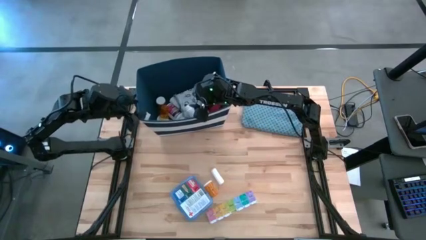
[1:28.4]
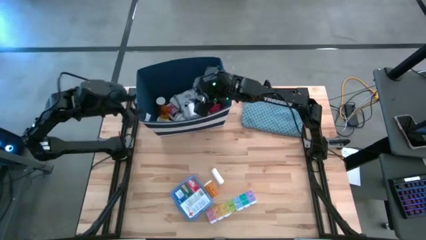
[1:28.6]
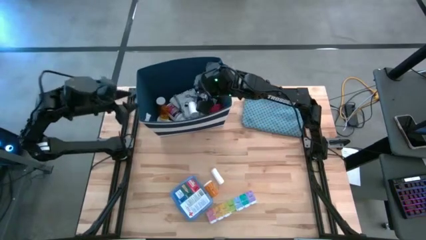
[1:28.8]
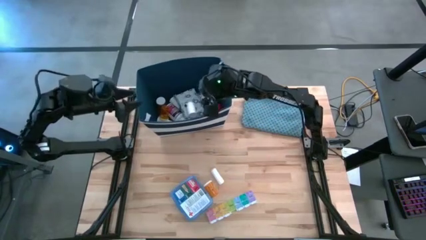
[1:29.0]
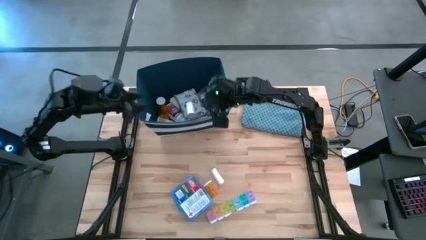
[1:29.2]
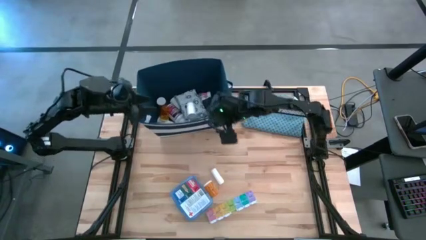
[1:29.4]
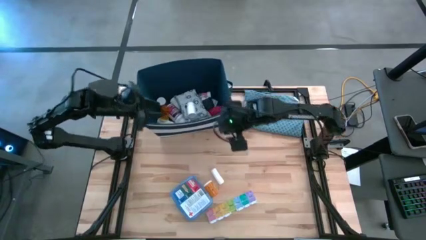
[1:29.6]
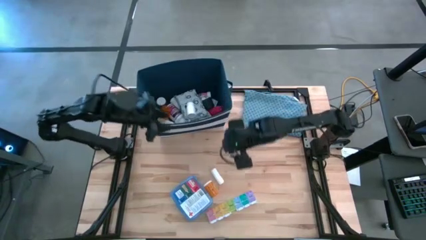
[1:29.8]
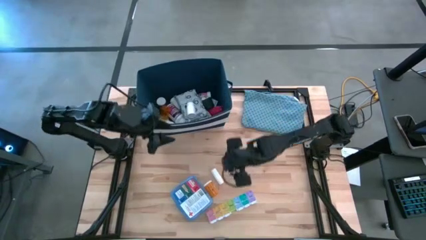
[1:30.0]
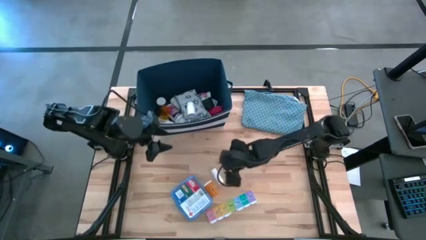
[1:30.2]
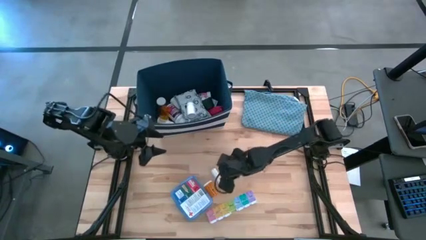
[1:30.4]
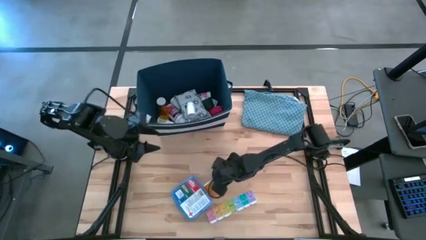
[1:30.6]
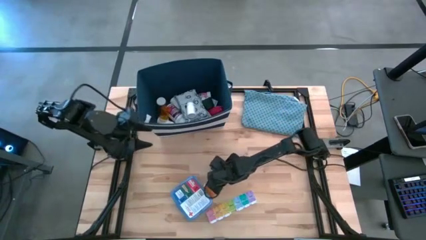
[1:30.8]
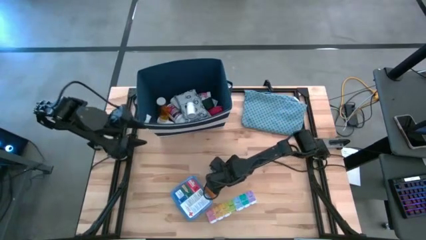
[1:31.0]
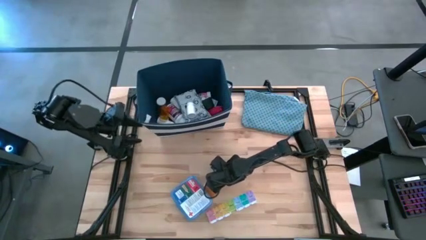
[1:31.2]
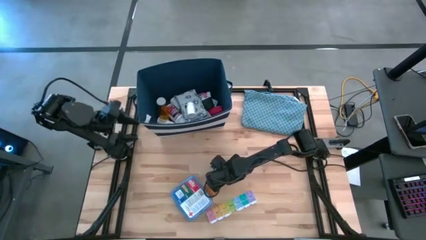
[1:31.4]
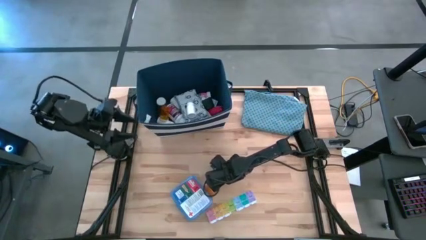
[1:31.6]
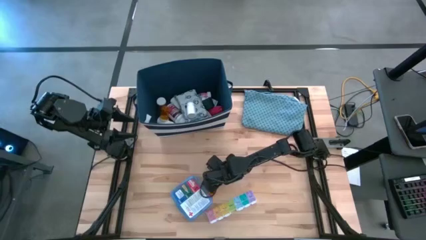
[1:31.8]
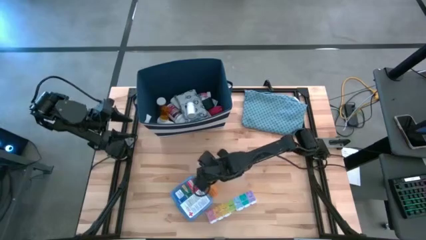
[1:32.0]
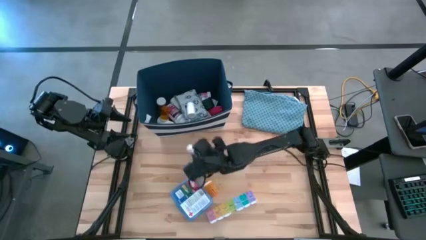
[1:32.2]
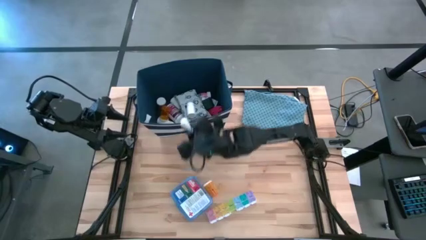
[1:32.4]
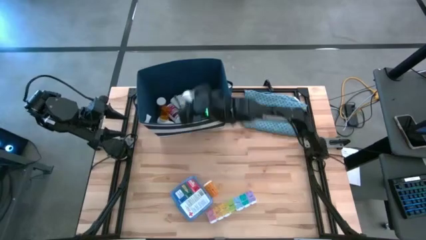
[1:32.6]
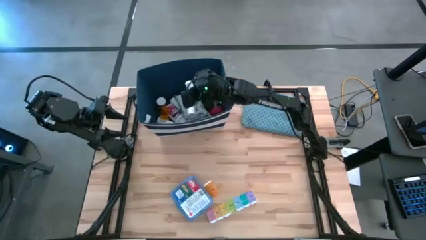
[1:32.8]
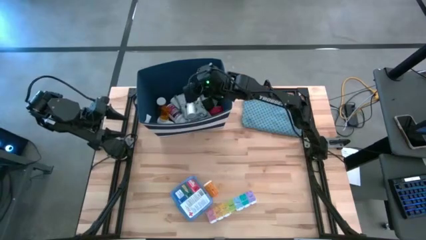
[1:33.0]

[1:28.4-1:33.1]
Task: Pick & place medical supplies in basket/bin
Put the rolled gauze into the blue bin

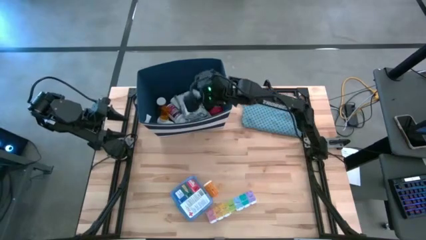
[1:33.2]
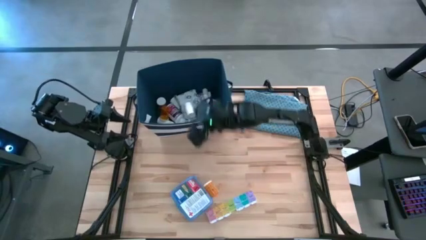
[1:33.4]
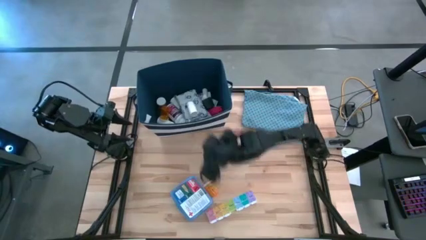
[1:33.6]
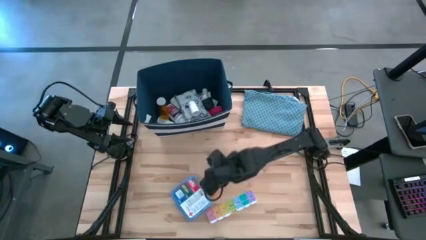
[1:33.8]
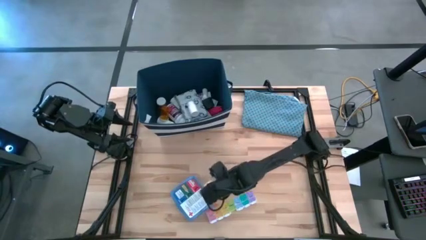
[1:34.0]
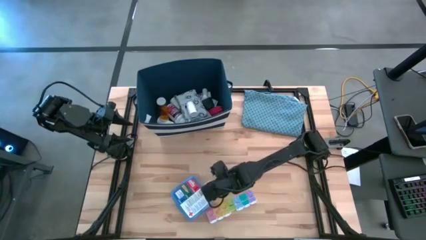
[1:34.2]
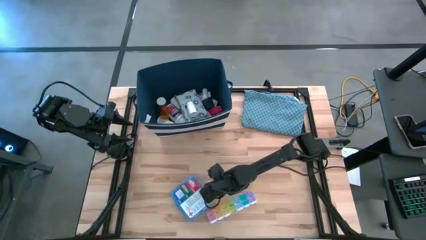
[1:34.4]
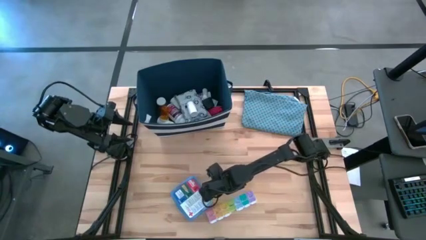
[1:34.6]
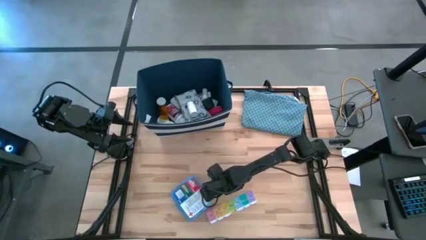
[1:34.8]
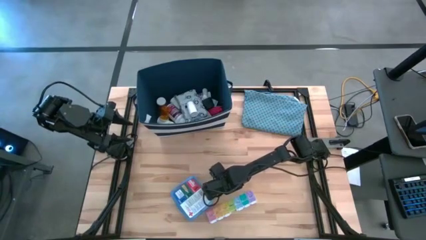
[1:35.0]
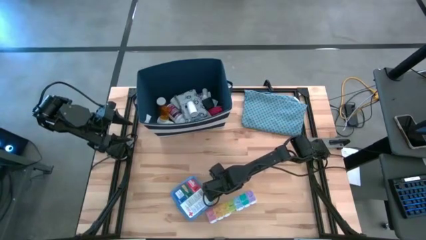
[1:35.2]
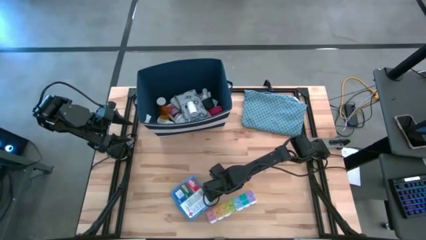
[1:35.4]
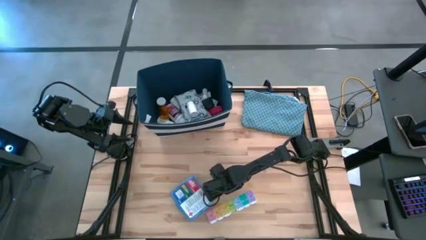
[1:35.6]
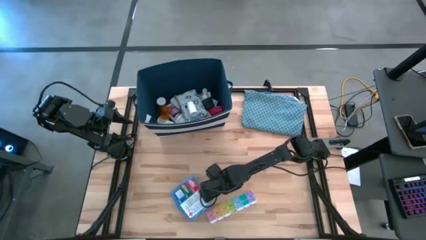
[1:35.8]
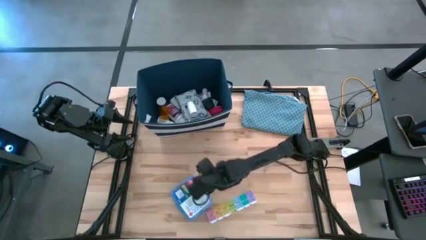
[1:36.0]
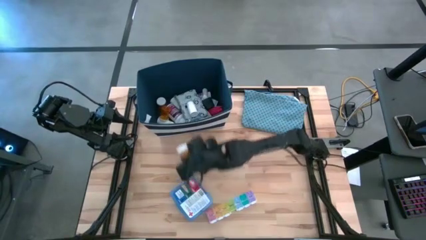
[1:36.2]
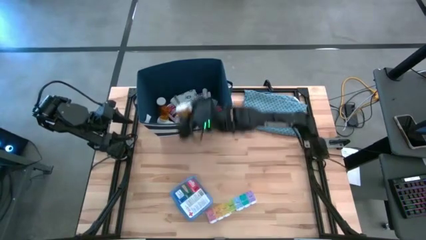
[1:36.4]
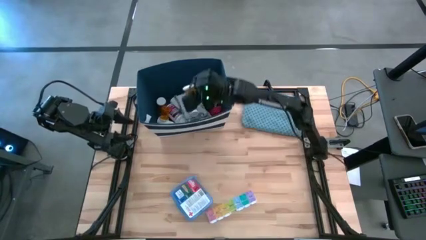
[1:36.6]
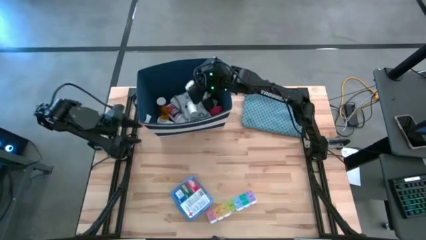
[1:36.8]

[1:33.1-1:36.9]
Put the orange pill bottle into the blue bin

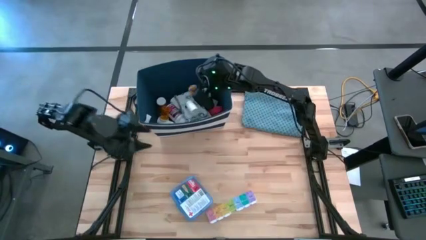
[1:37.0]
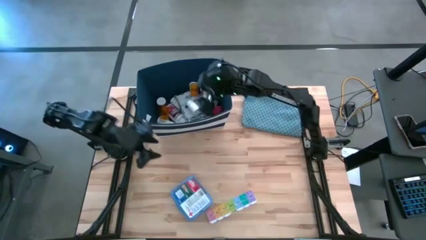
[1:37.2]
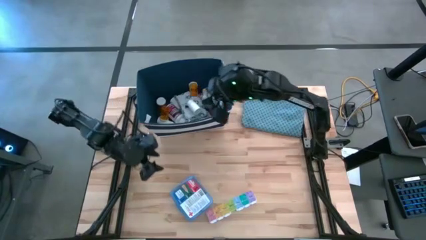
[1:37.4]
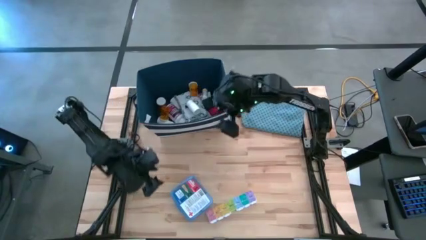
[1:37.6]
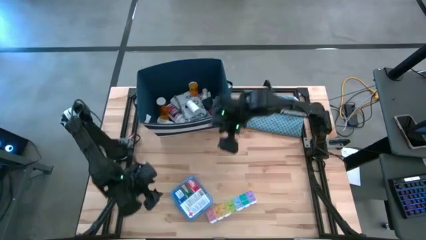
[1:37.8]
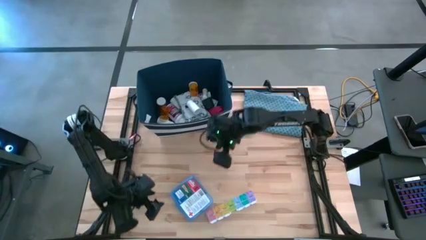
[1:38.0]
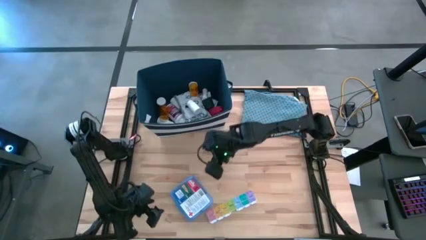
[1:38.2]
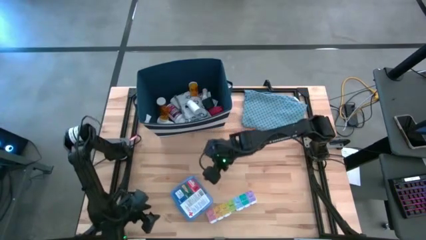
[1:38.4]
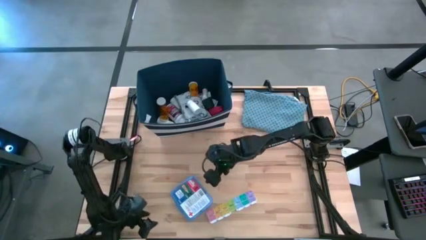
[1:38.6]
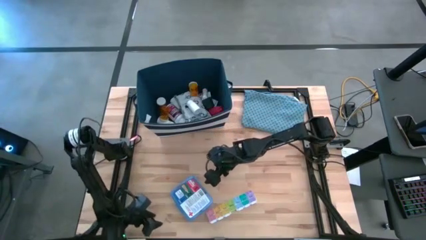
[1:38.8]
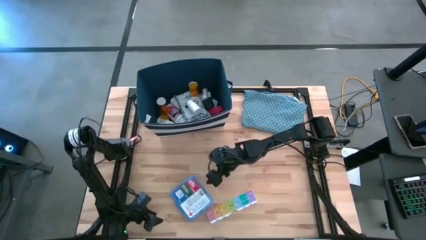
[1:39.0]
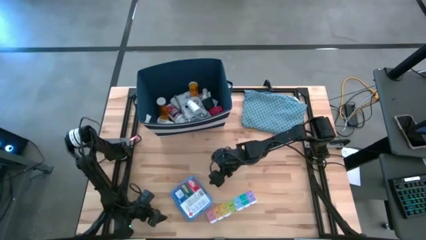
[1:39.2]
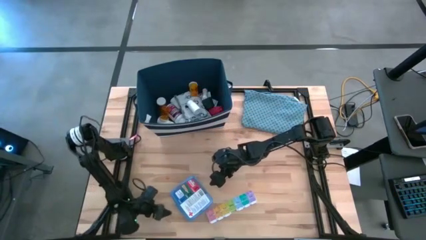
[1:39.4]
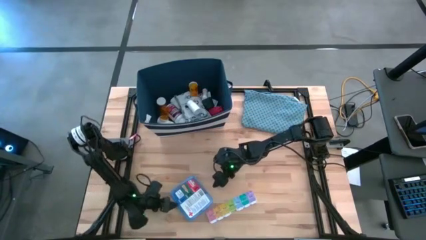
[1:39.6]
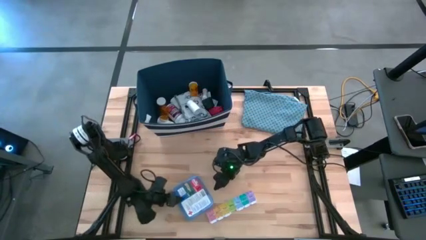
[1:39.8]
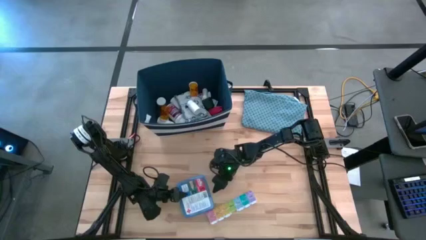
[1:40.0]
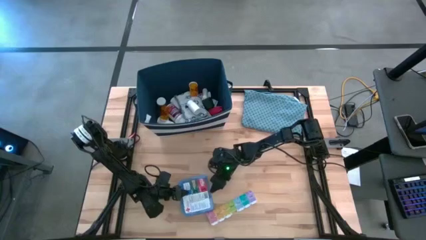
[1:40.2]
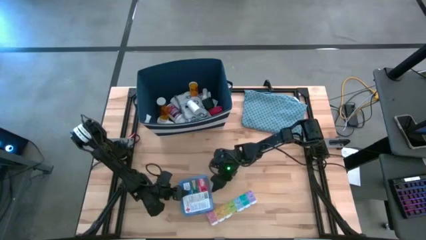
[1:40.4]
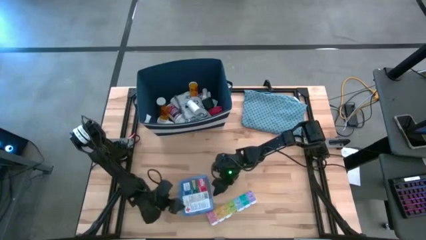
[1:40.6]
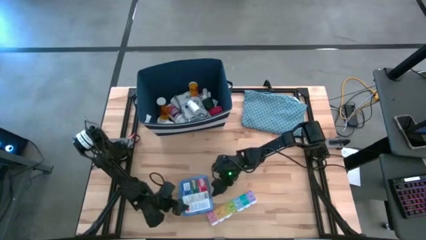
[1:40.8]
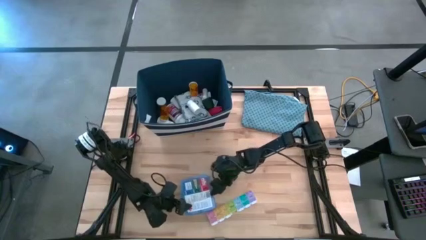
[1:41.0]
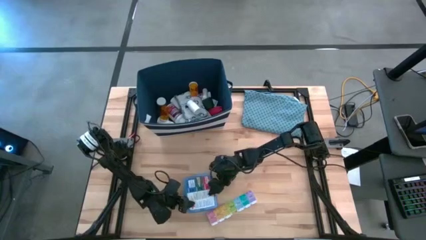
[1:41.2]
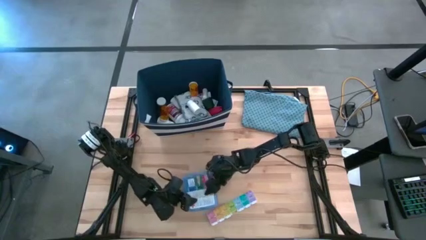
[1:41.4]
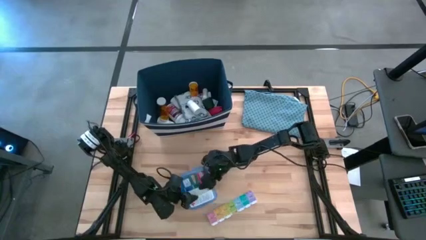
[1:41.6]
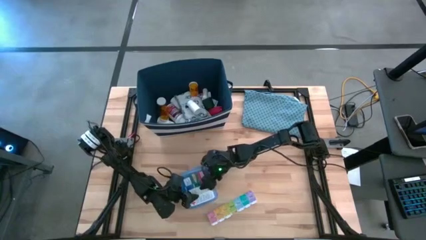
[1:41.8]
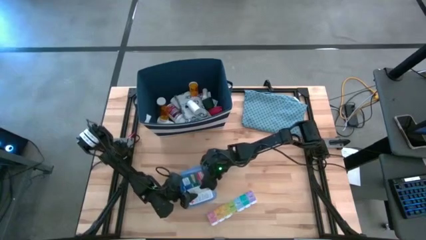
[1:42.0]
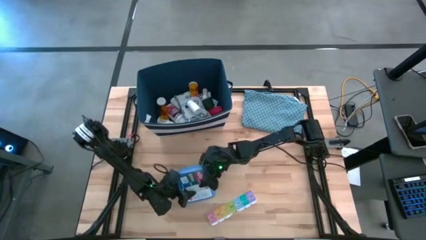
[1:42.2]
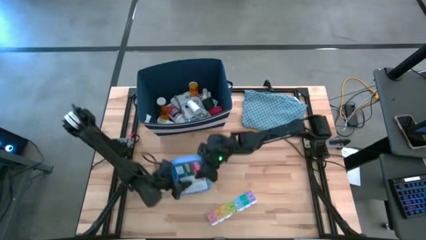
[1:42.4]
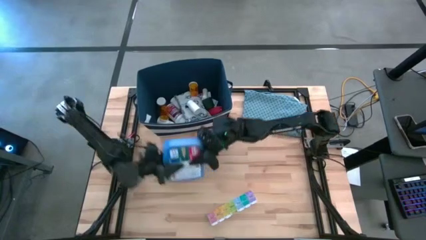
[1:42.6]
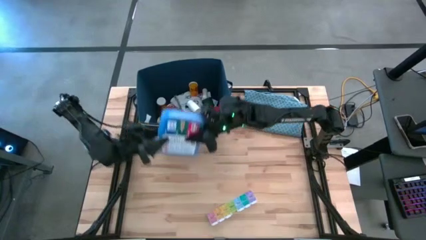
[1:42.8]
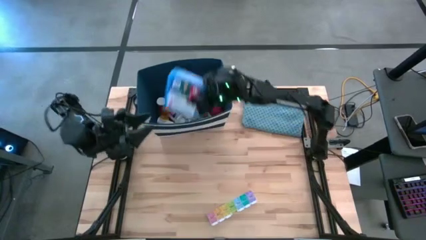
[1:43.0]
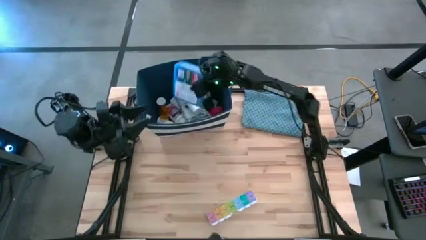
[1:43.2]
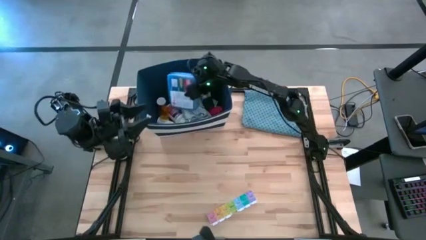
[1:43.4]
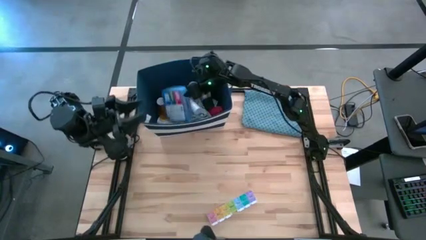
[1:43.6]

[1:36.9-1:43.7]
Put the blue first aid kit into the blue bin

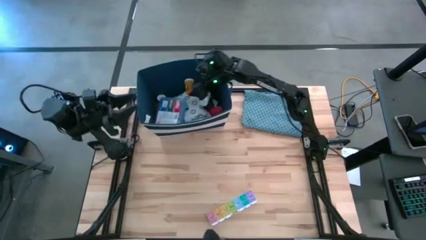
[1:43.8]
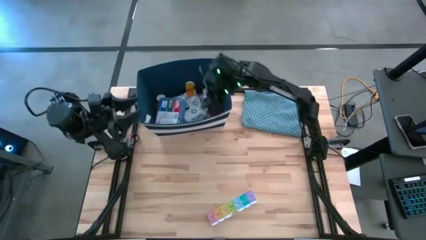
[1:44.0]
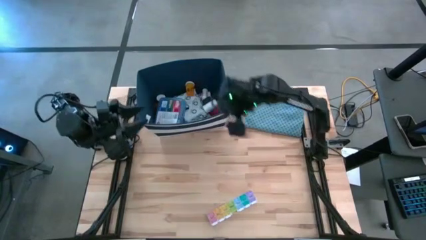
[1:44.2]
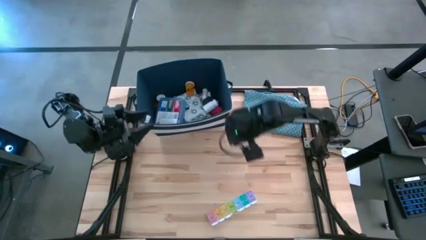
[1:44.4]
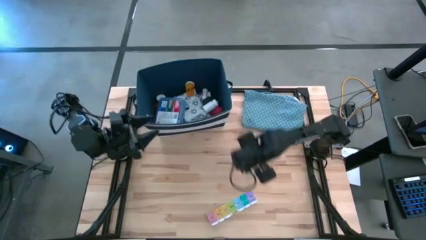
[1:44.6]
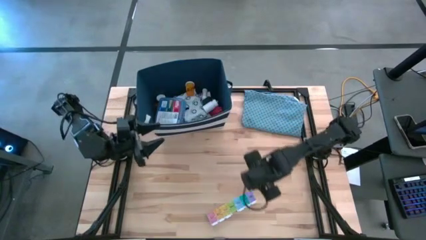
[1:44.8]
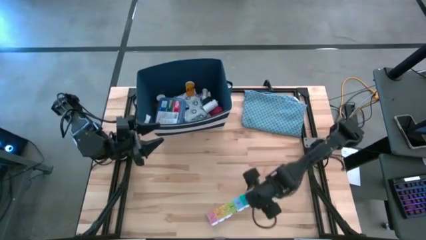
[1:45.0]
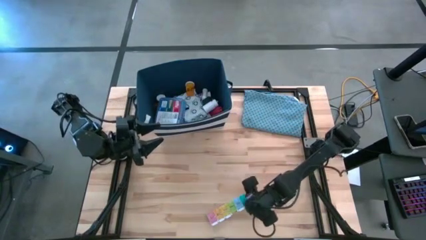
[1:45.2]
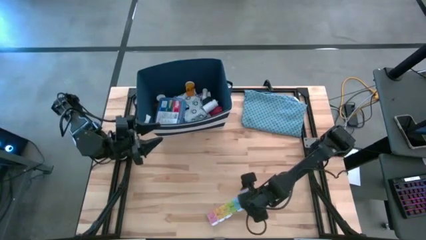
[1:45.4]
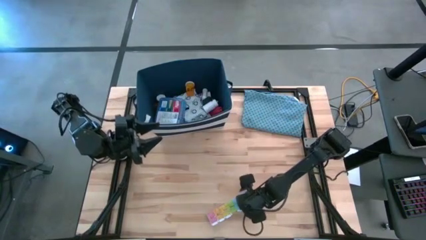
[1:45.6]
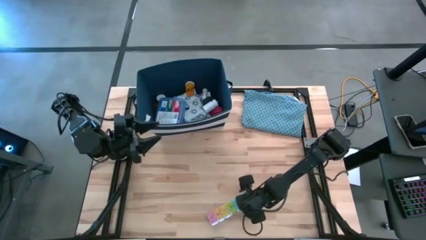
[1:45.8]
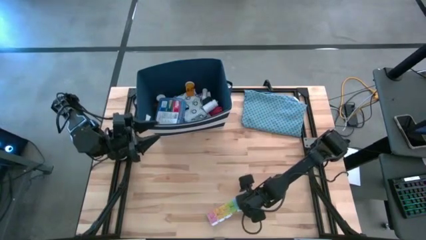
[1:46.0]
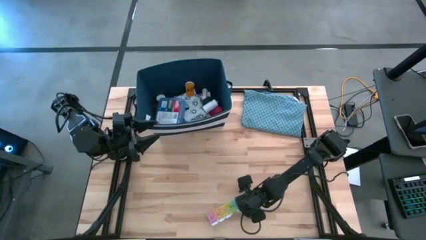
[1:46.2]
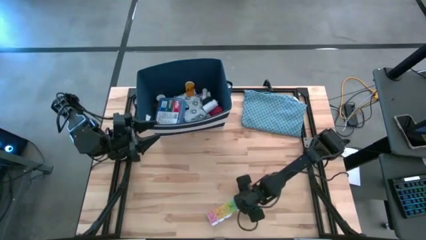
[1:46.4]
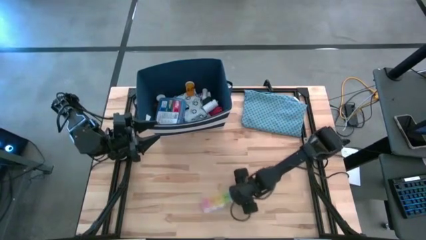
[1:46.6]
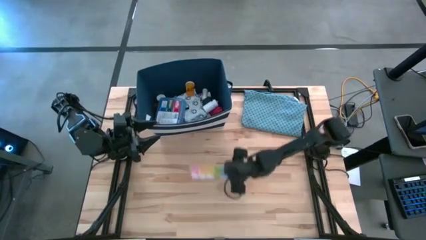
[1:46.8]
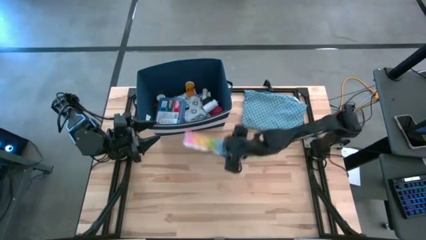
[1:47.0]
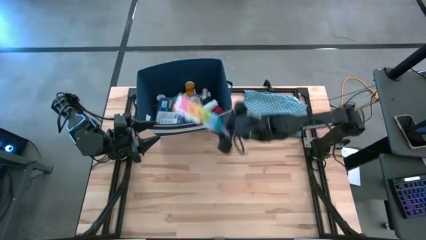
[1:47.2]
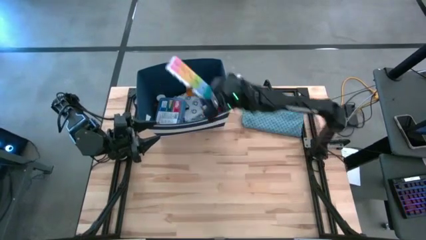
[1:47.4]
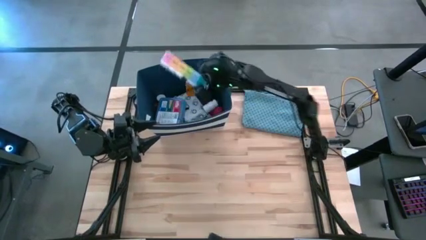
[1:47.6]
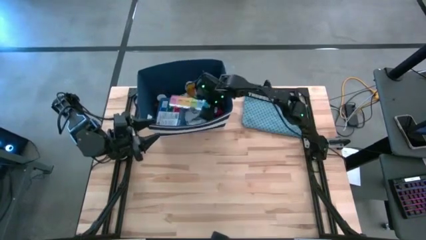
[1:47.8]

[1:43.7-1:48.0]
Put the pill organizer into the blue bin
